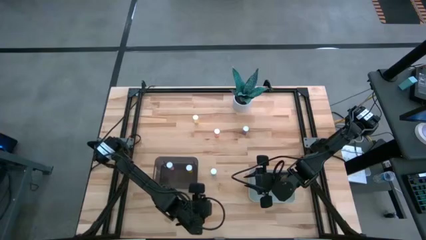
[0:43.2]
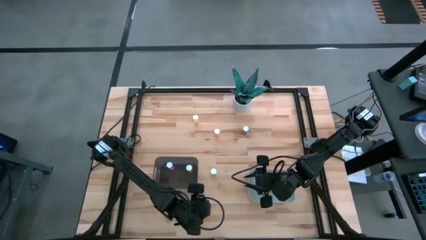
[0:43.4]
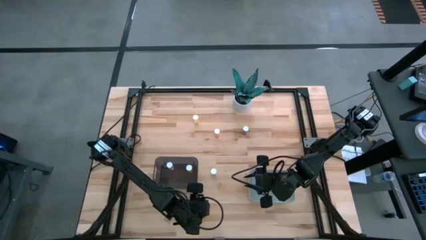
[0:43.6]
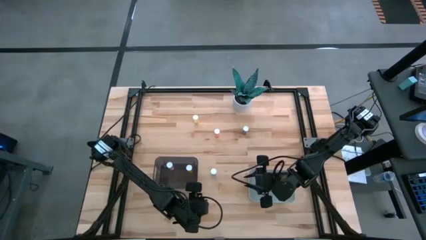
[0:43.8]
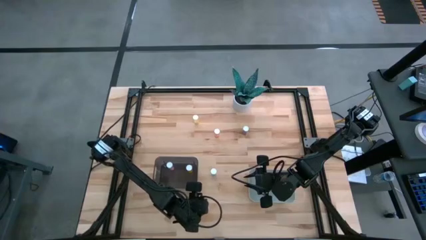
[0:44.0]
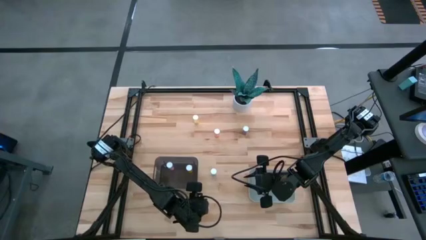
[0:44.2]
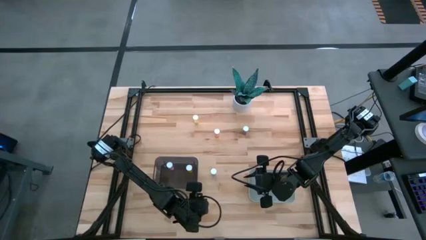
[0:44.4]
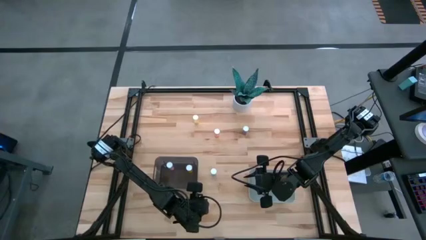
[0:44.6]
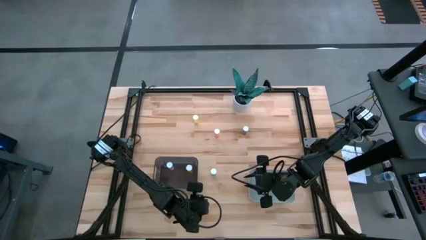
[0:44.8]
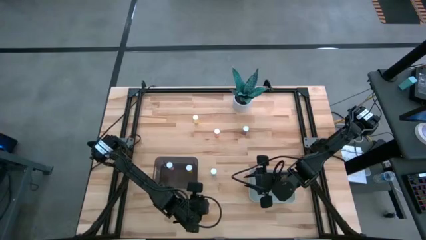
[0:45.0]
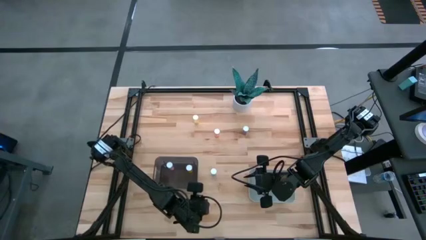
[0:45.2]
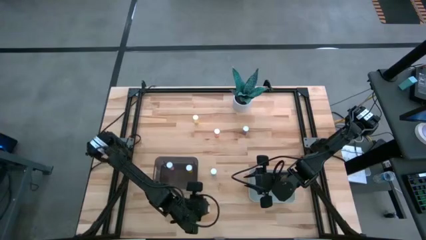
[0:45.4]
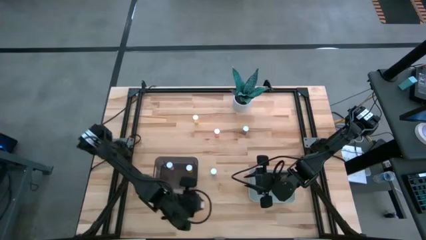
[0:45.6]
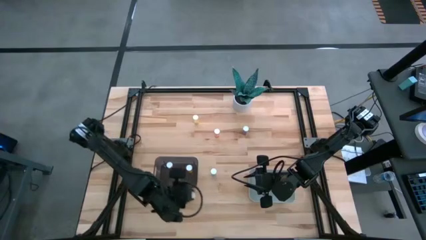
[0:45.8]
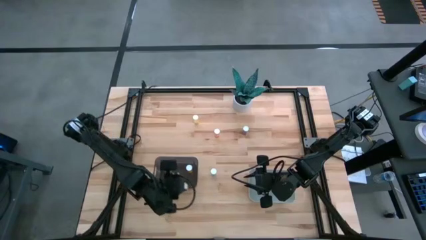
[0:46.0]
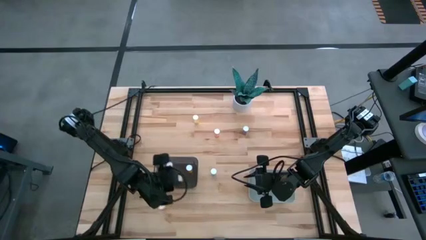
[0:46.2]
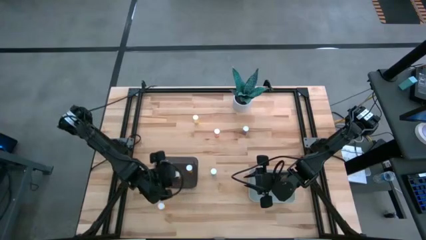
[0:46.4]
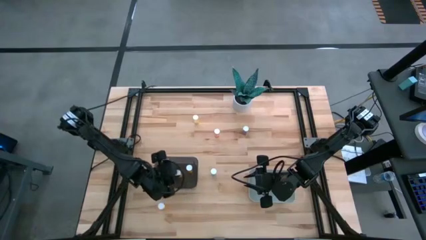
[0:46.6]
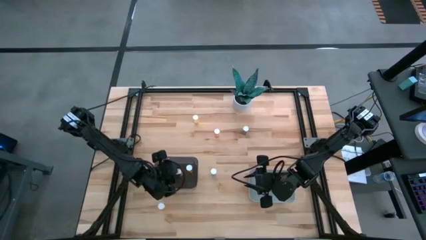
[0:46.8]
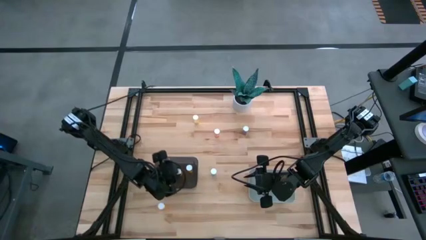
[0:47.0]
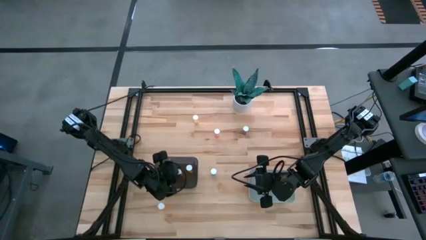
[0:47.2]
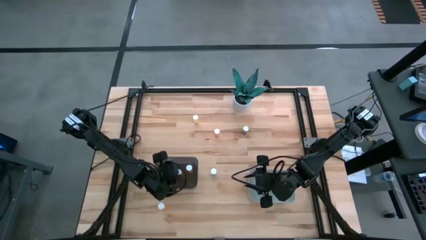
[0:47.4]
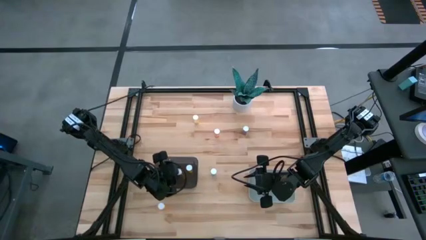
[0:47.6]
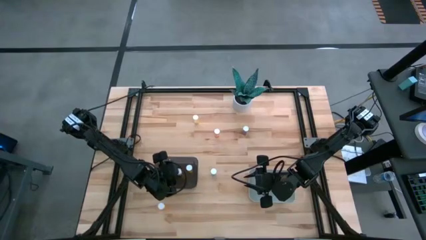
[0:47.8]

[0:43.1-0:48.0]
Task: Pick and place medicine bottles into bin by pill shape (circle, oval)
Put the right orange tablet bottle into the black bin

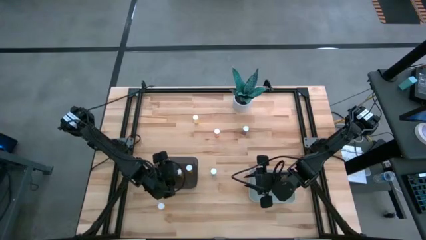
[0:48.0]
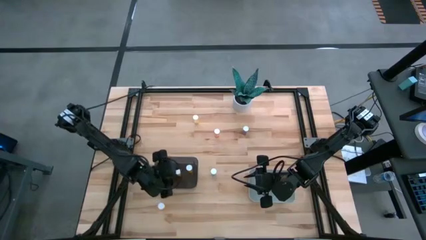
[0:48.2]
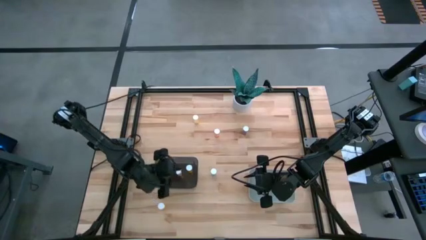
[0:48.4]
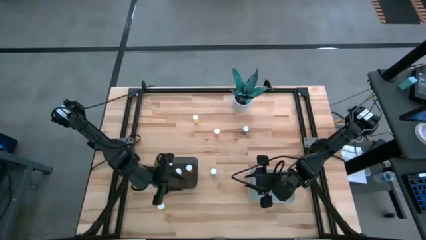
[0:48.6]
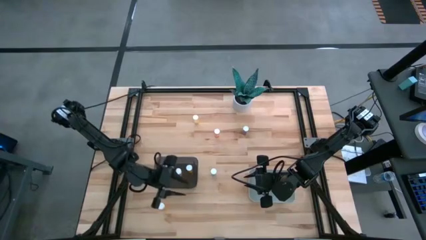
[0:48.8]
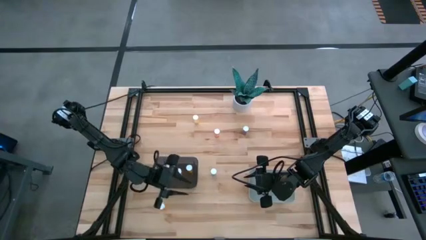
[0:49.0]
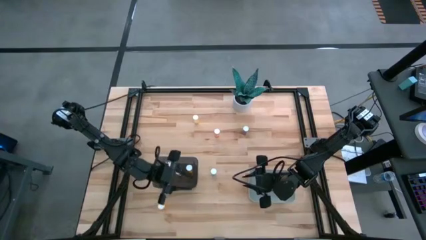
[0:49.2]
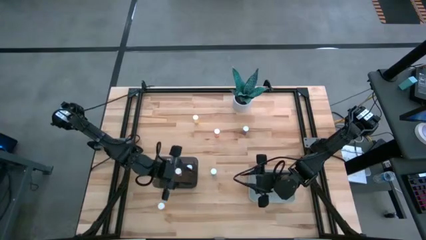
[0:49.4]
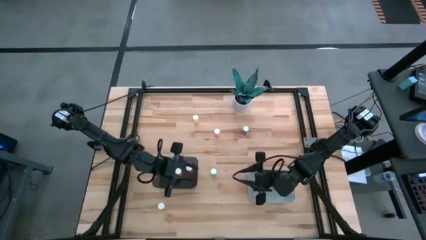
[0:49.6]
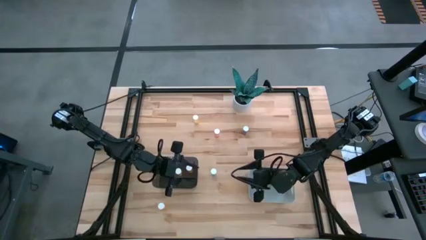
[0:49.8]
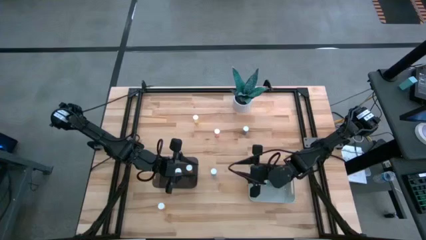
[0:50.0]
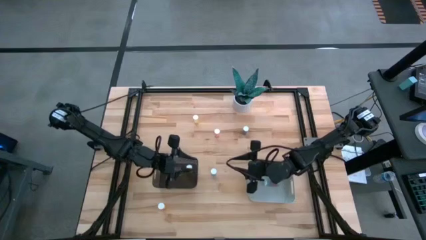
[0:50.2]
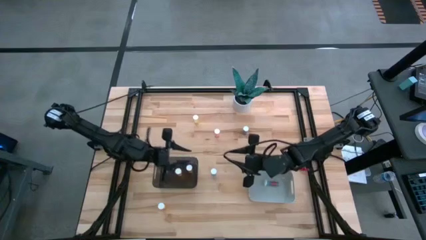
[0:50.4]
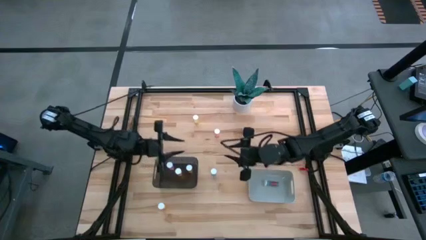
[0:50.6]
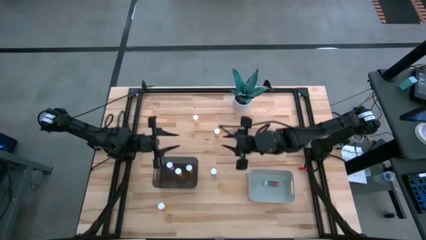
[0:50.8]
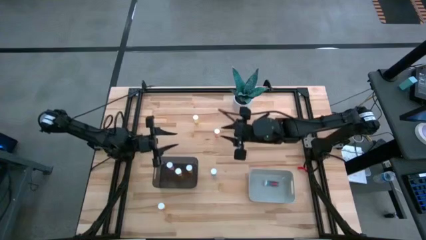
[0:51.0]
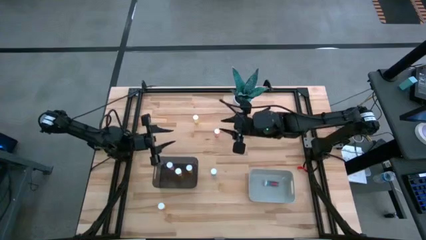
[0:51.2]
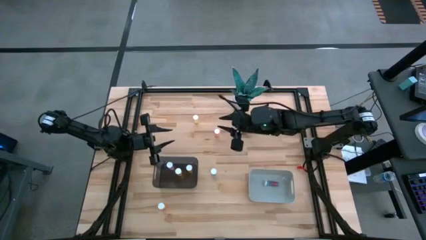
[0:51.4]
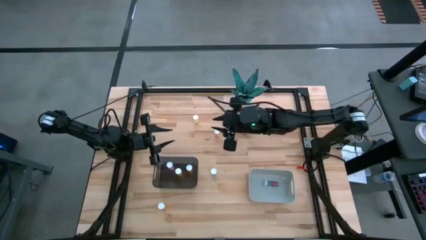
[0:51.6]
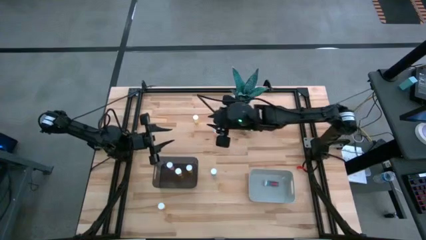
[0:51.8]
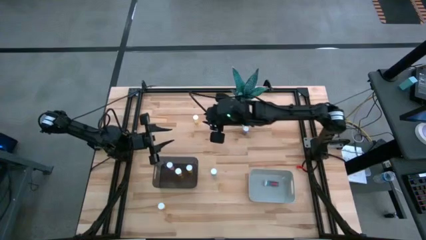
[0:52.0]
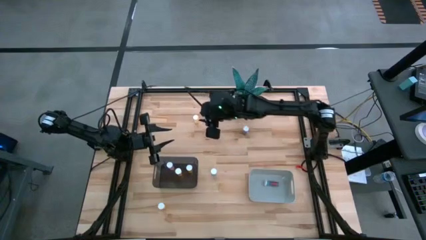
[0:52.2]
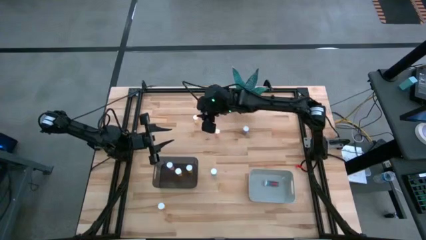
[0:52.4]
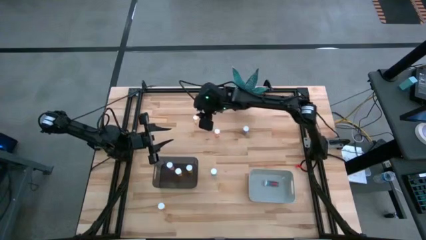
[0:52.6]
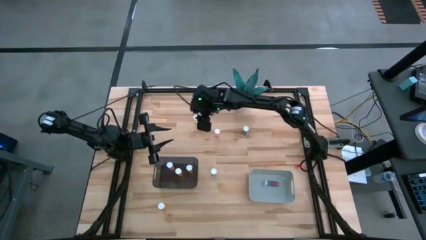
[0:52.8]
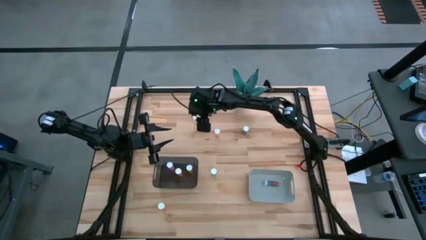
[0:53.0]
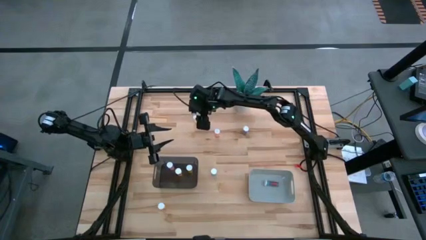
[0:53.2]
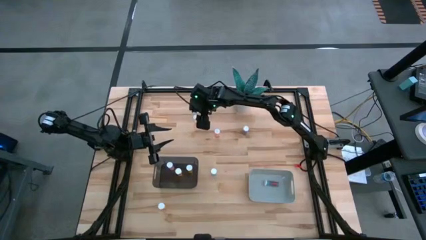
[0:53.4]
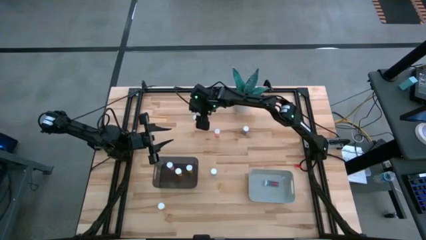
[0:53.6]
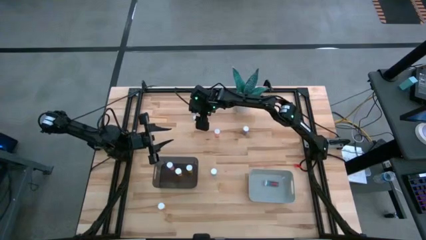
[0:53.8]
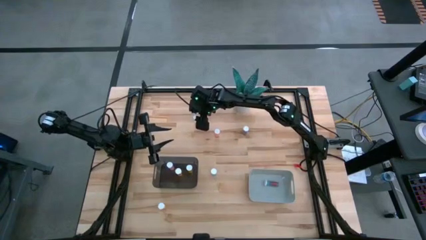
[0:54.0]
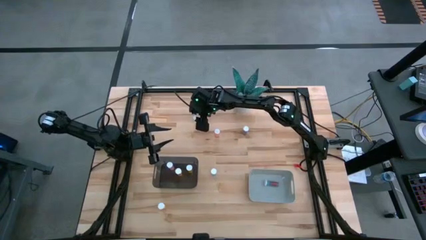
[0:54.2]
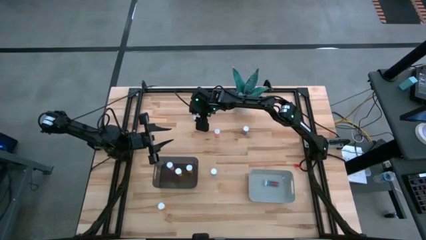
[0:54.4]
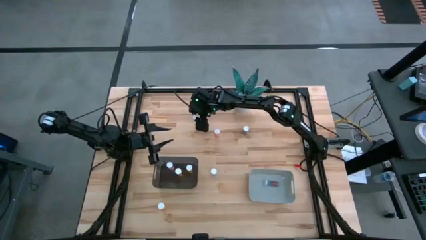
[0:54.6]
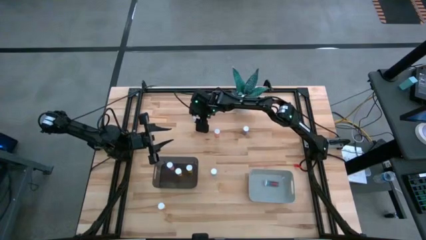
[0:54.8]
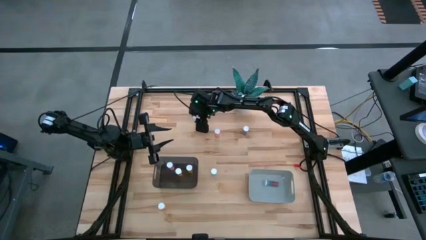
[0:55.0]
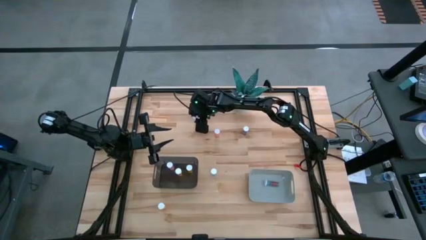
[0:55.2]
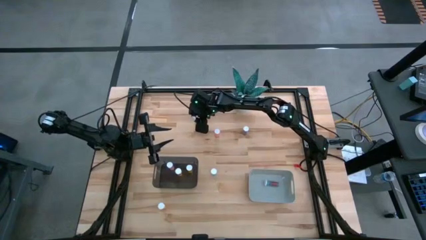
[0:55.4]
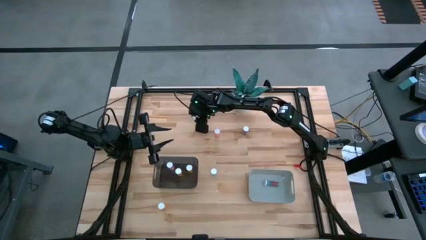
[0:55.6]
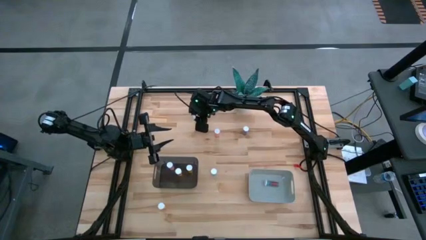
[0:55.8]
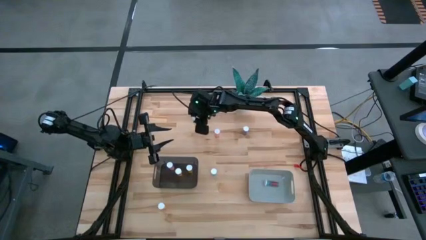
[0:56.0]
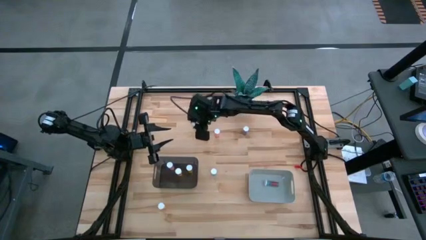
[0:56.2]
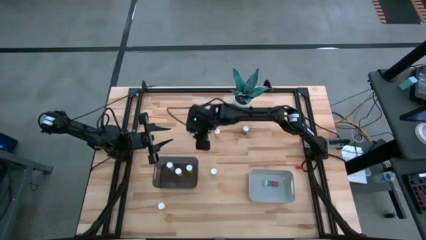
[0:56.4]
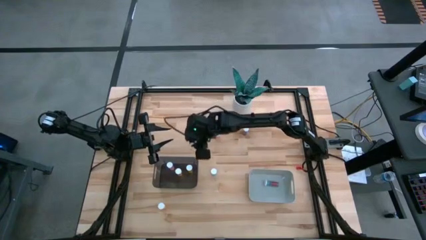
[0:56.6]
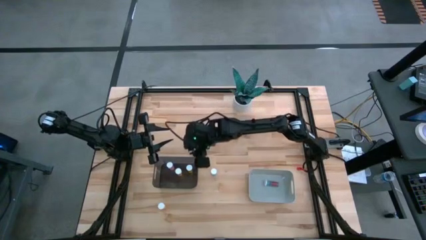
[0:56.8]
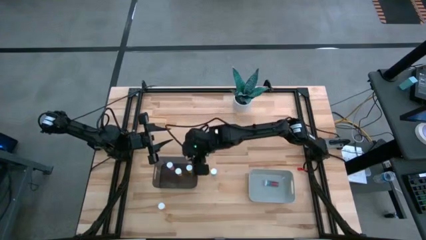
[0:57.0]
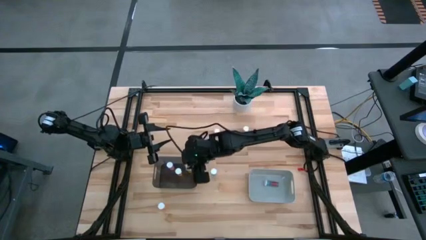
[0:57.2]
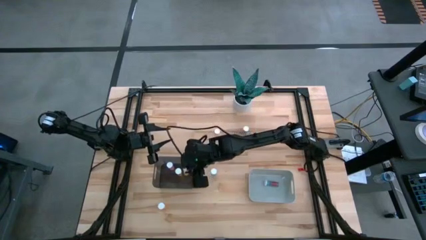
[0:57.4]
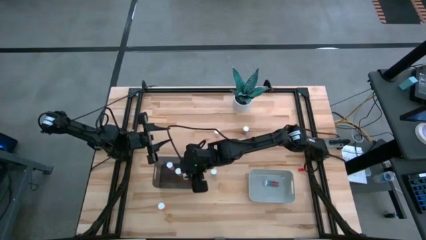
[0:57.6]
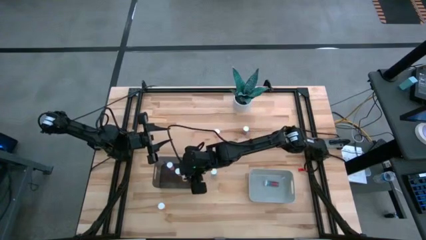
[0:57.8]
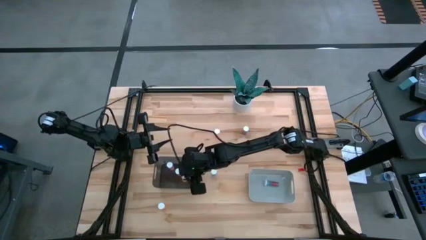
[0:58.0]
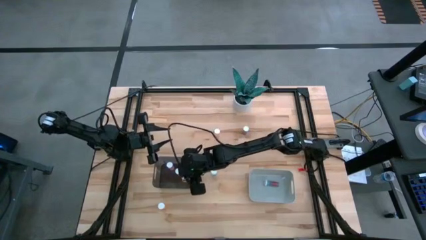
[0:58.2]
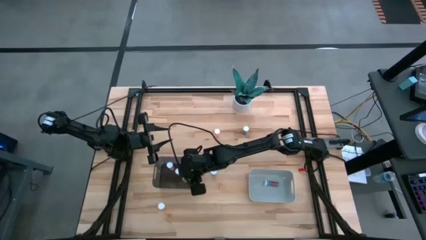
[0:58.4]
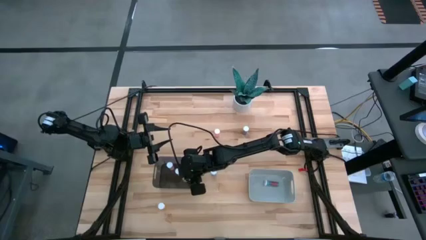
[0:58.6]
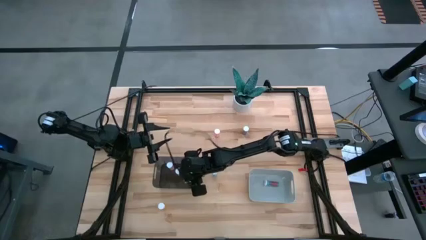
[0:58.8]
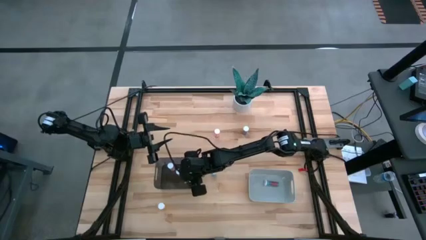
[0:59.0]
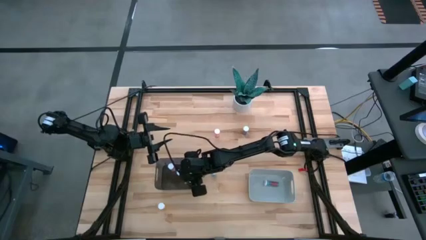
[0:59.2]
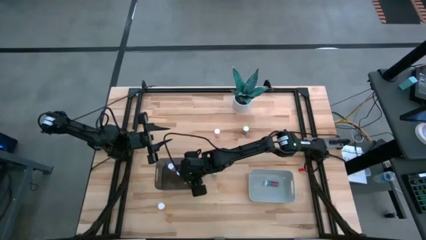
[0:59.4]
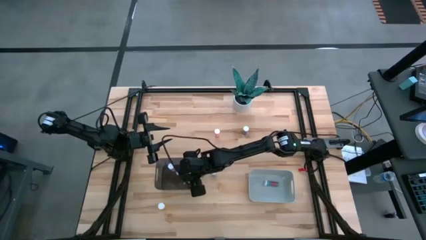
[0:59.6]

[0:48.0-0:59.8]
Put the yellow tablet bottle into the black bin
